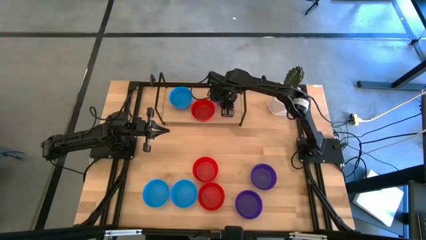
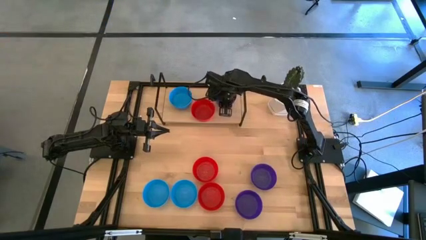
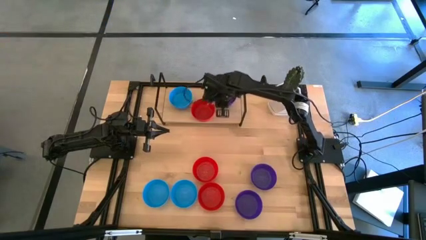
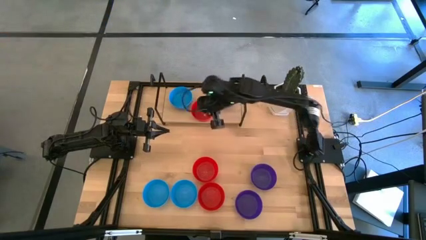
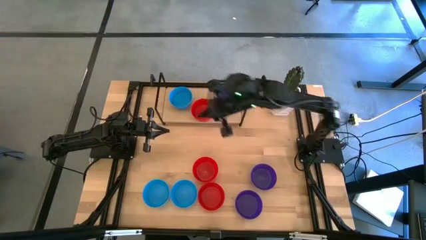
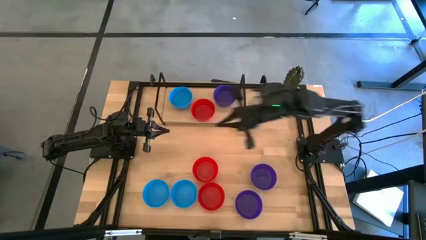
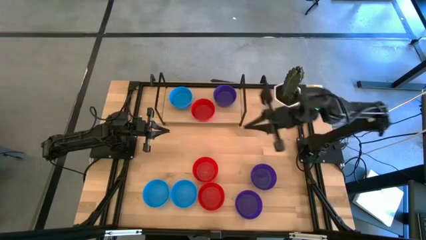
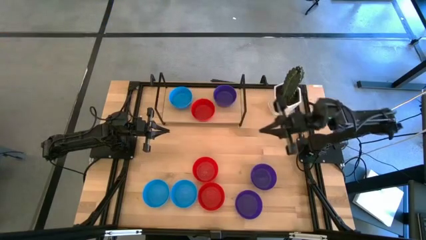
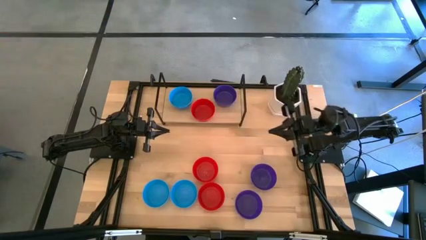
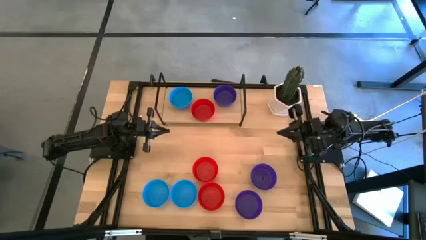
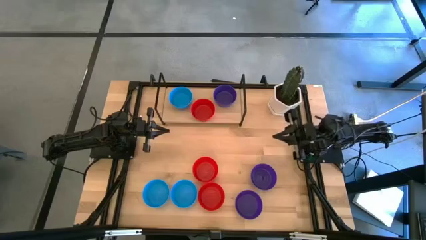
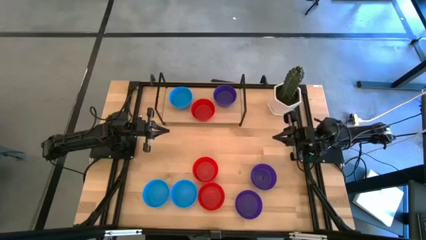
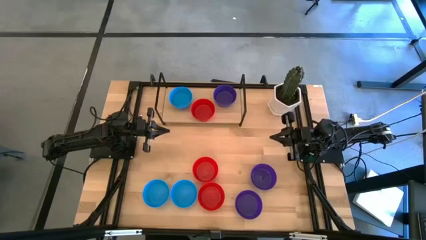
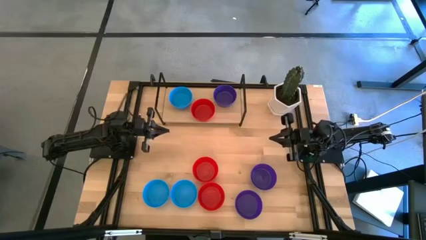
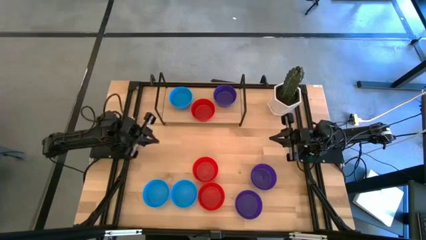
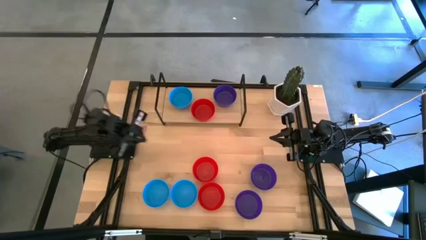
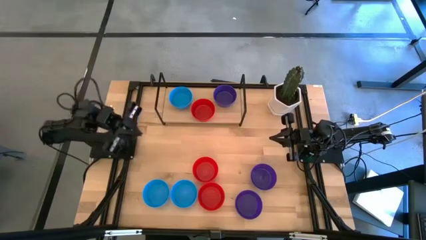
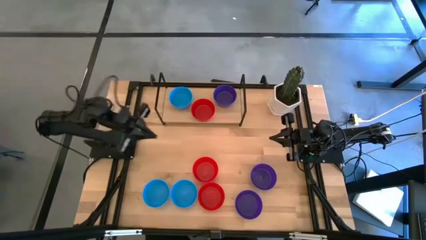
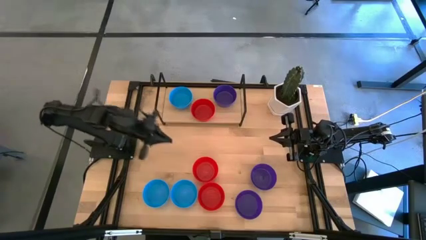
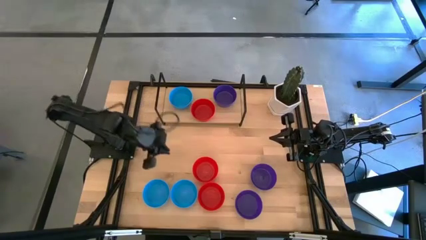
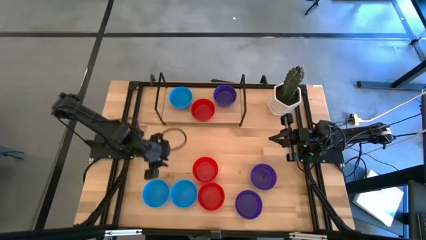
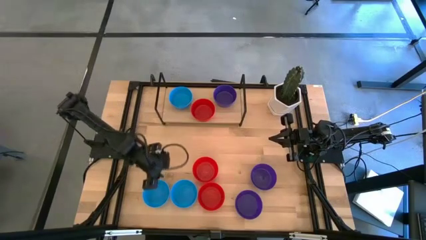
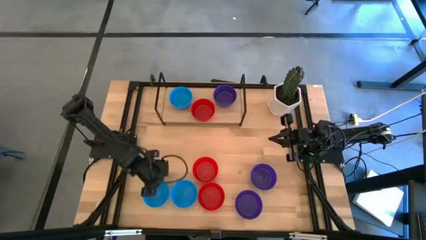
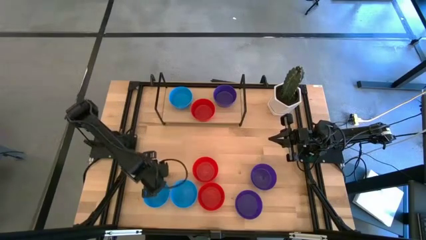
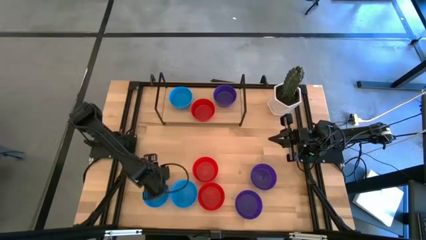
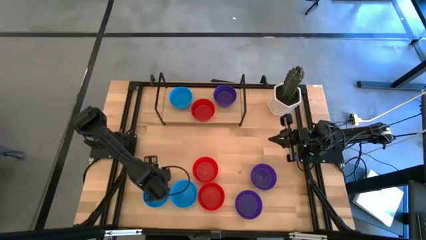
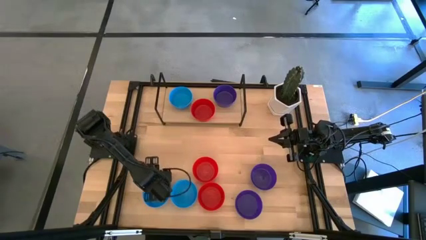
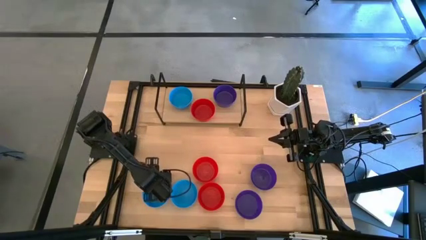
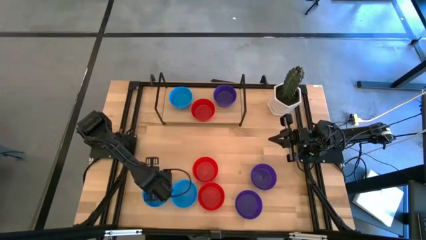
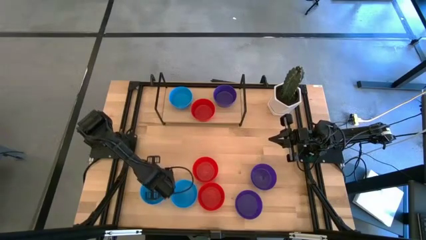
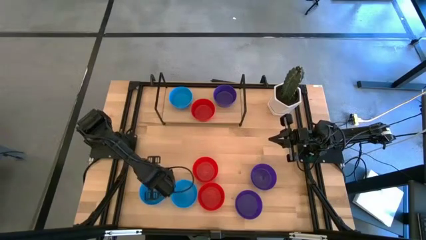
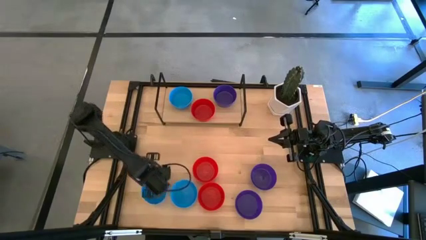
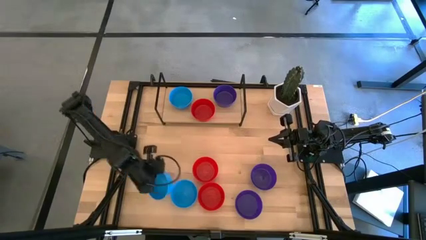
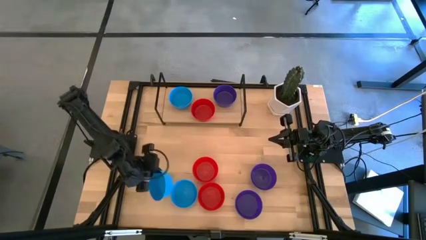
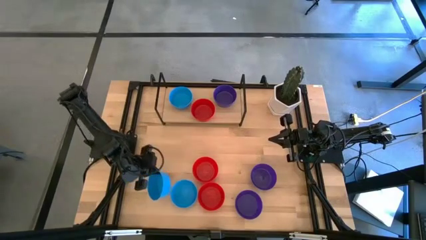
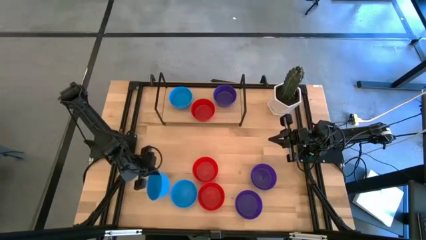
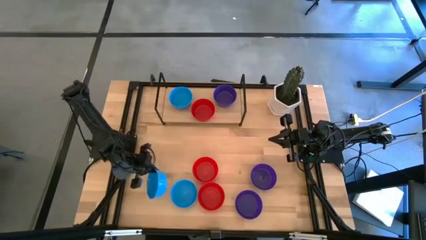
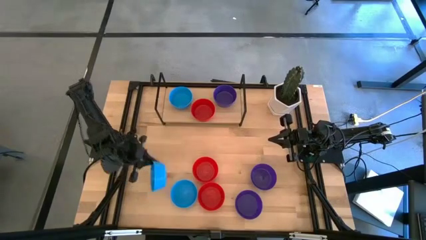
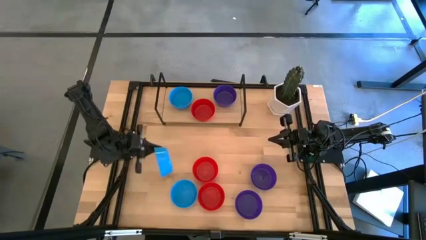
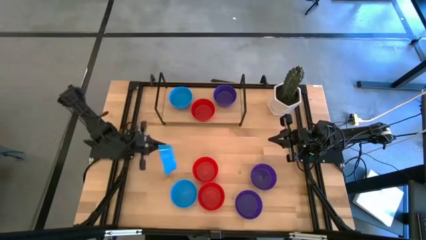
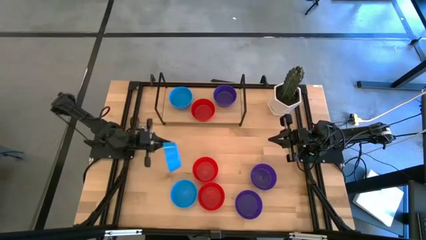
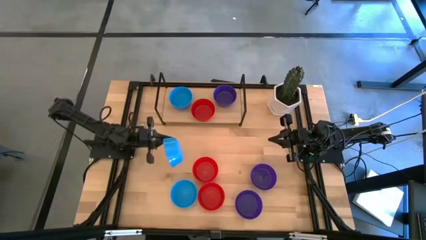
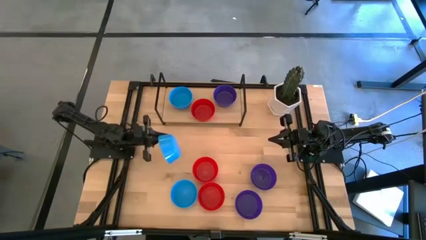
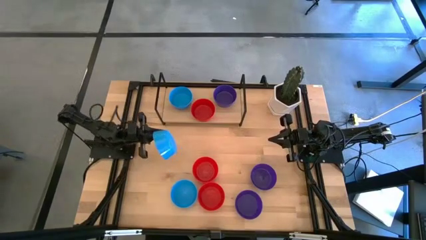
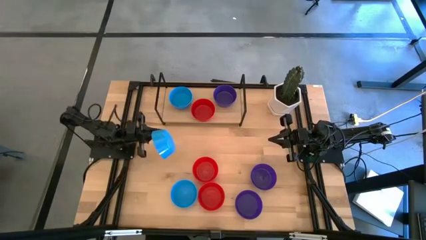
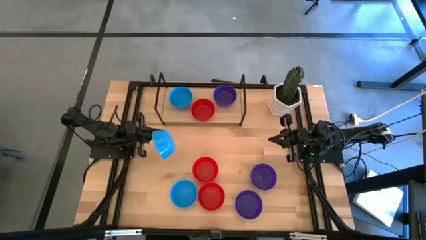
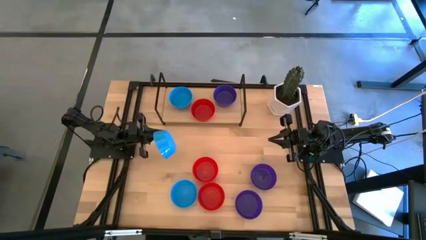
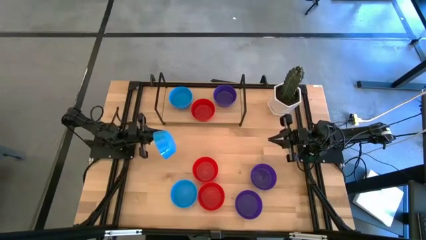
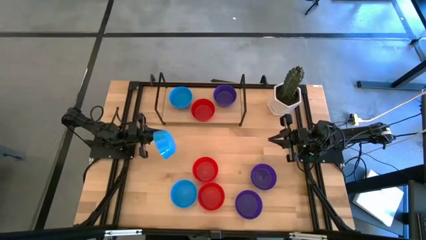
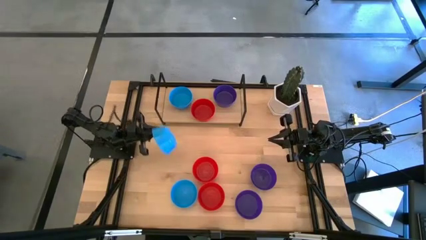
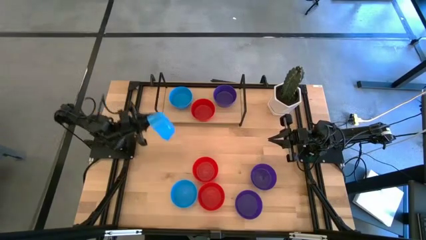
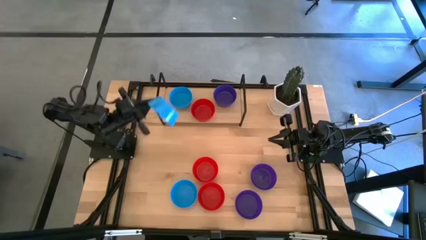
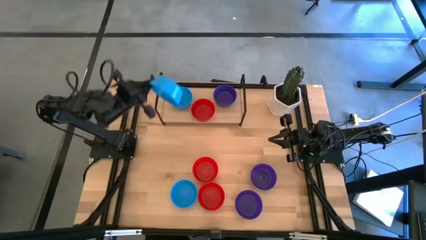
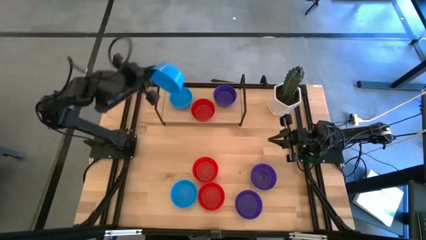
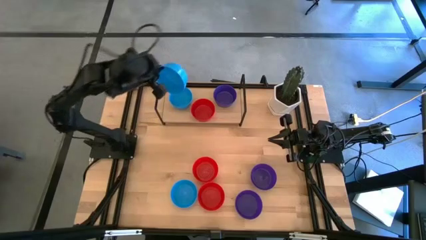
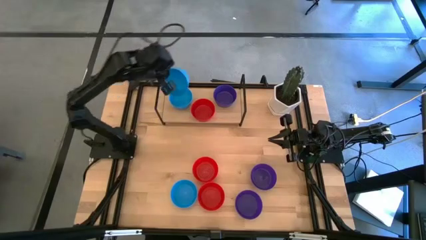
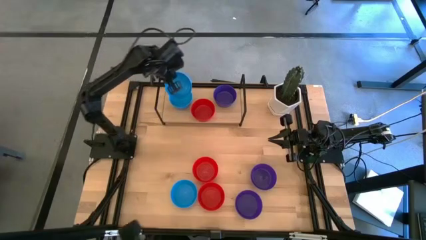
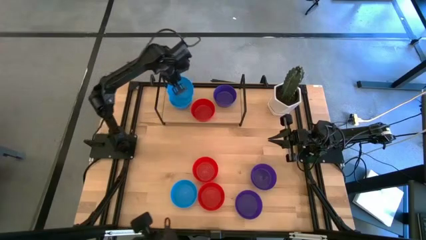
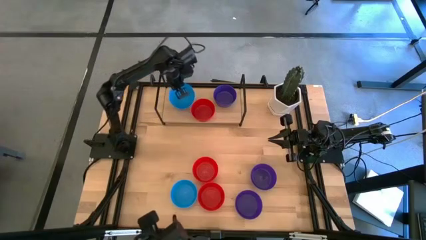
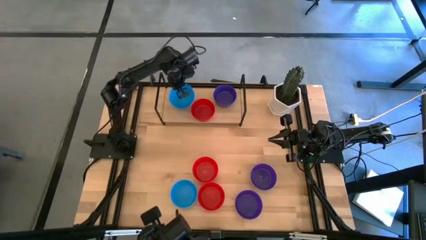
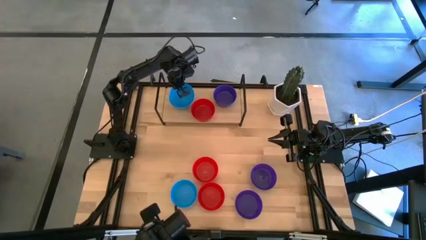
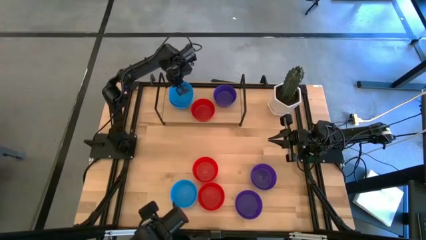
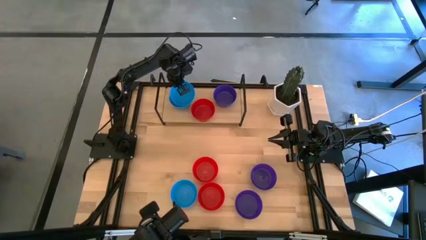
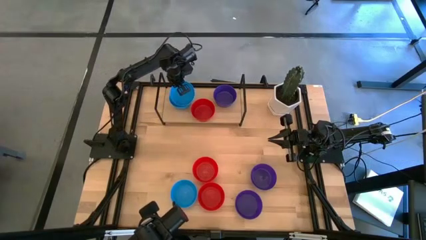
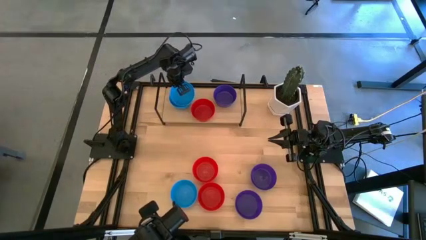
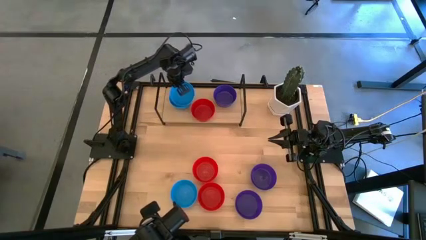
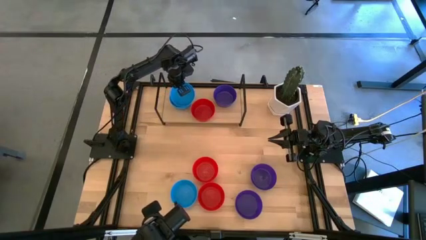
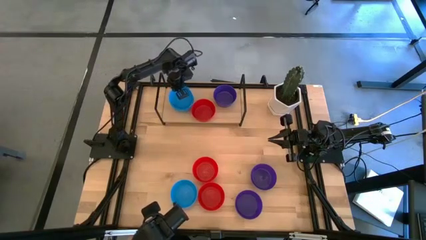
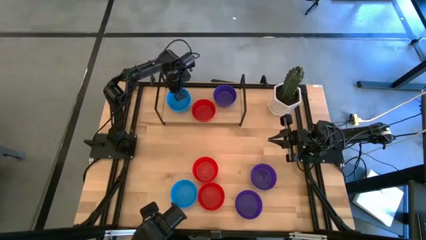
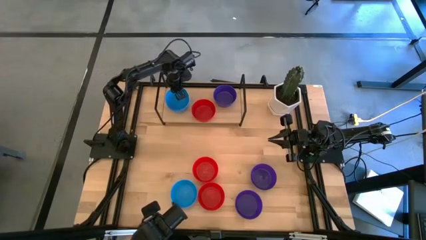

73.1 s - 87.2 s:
Task: Pick & Place Mini bowls
Stack the blue bowl on top of the blue bowls on the shelf

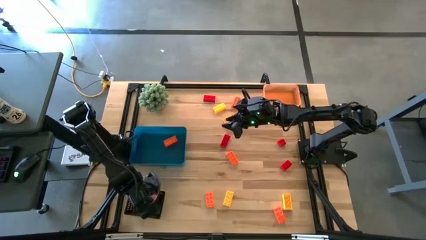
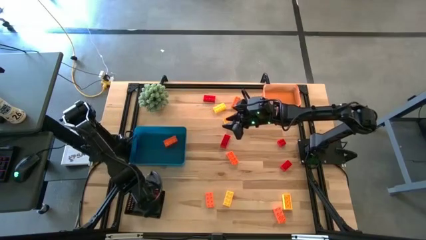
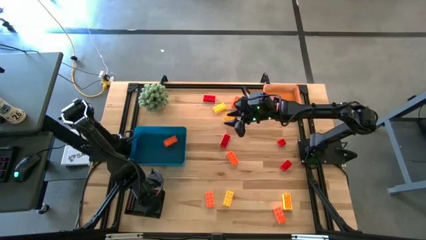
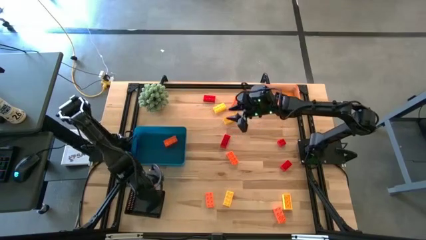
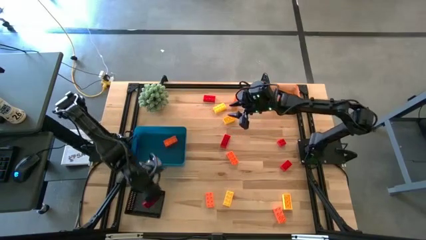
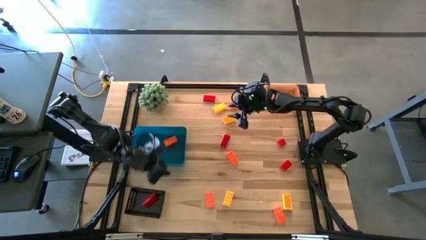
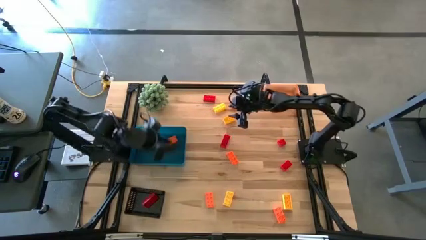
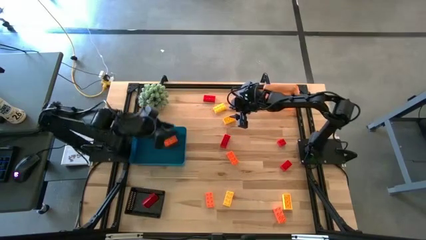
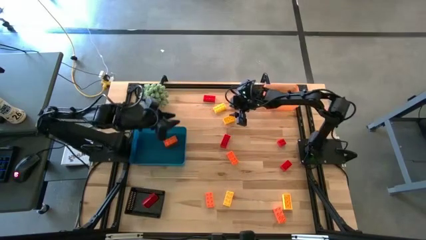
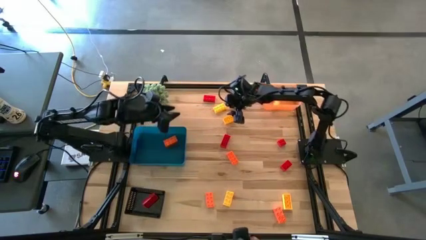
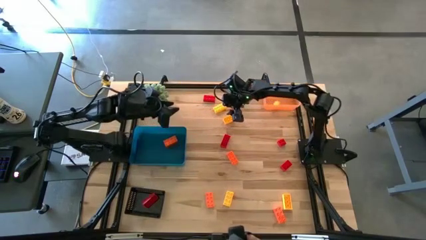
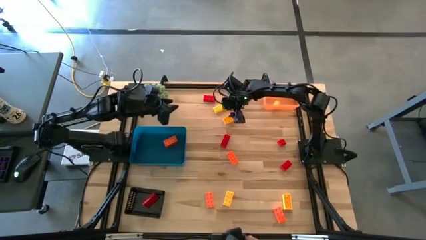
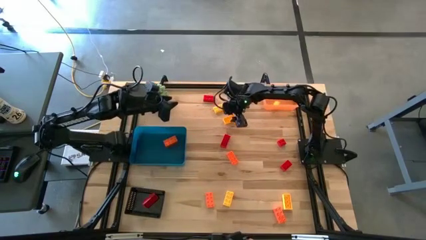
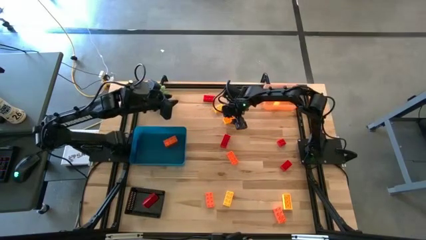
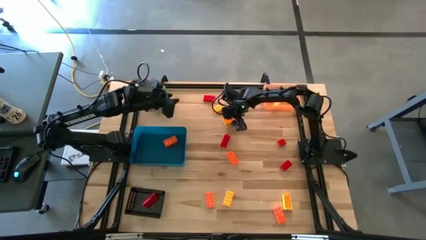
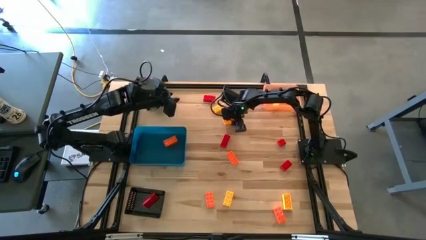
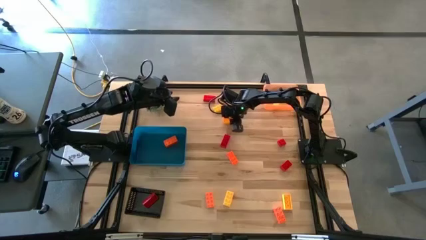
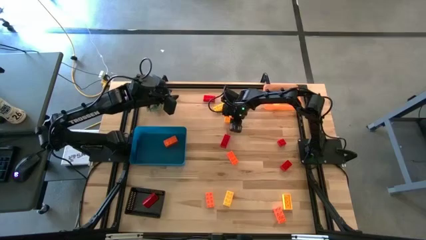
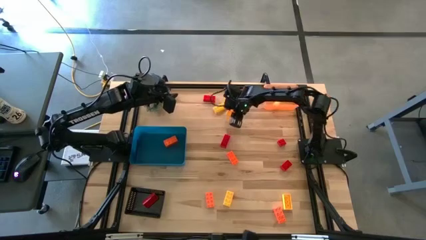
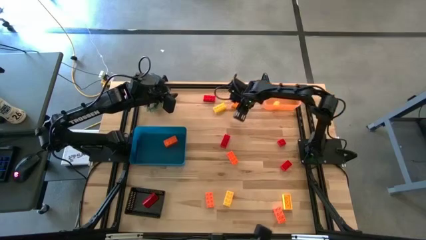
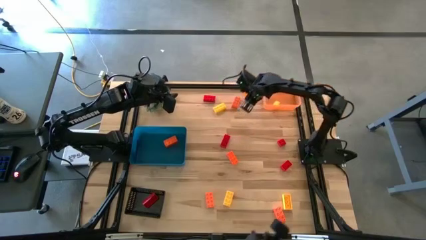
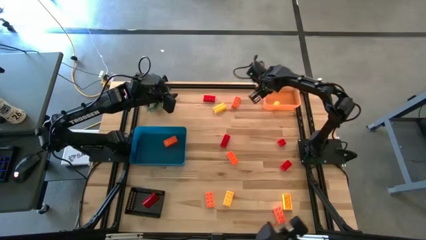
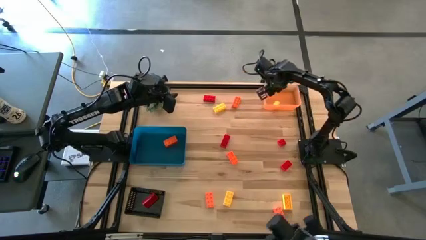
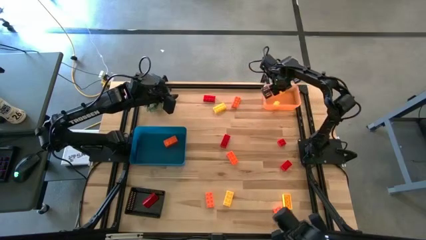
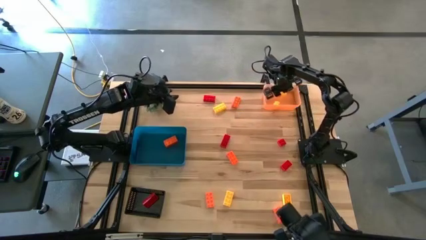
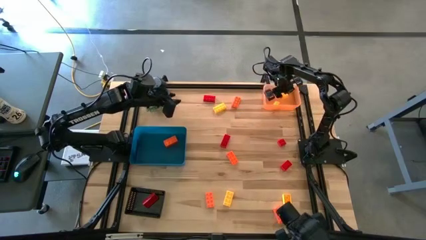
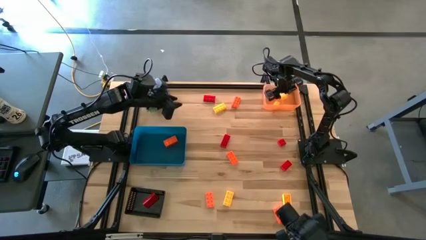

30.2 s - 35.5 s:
Task: Sort & place blocks by color
Put the yellow game piece into the orange bin
